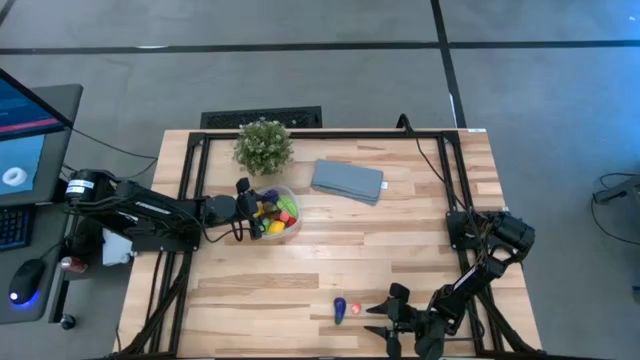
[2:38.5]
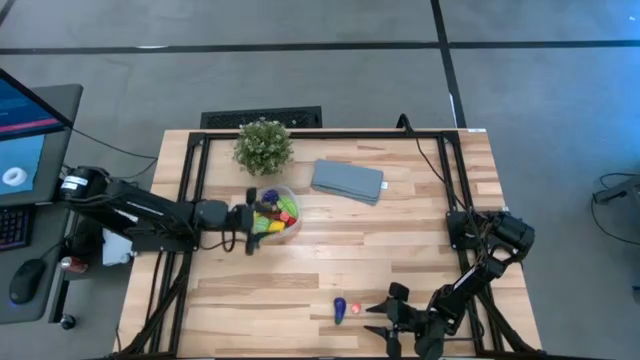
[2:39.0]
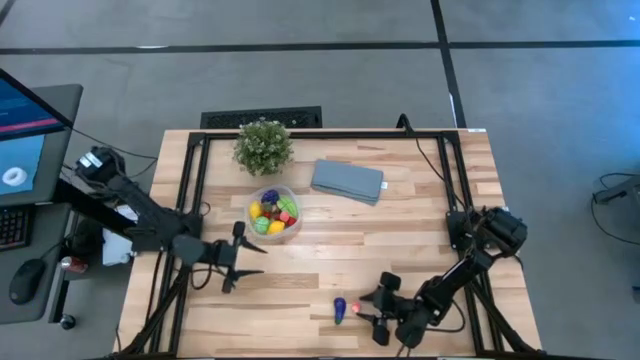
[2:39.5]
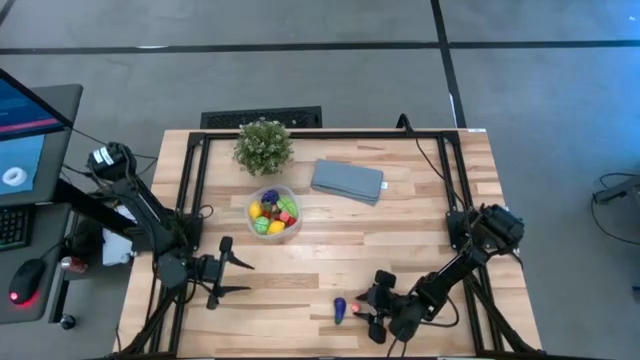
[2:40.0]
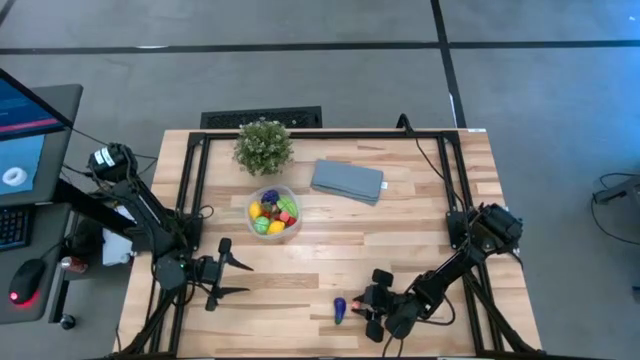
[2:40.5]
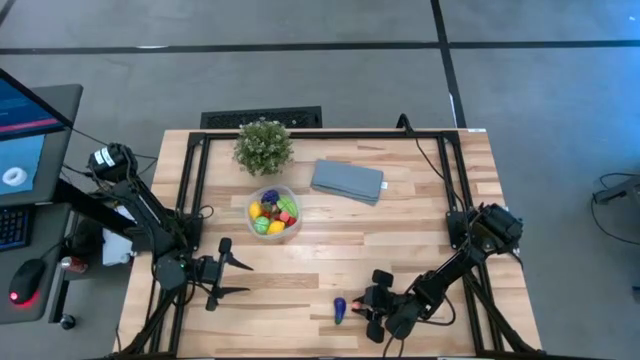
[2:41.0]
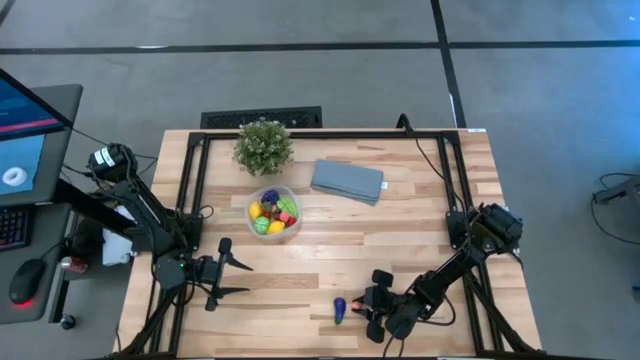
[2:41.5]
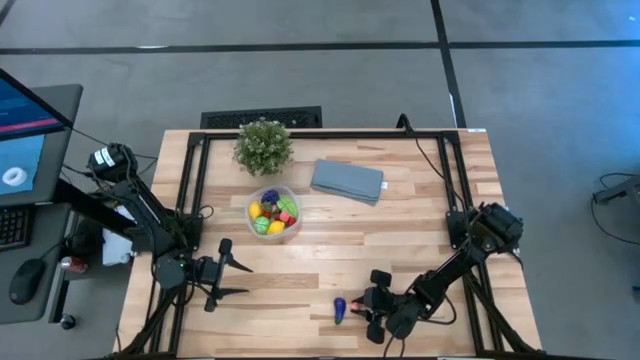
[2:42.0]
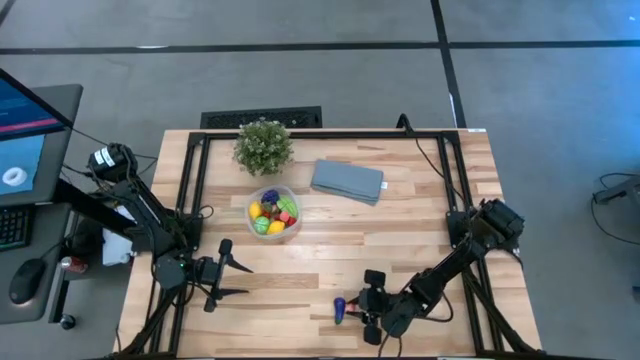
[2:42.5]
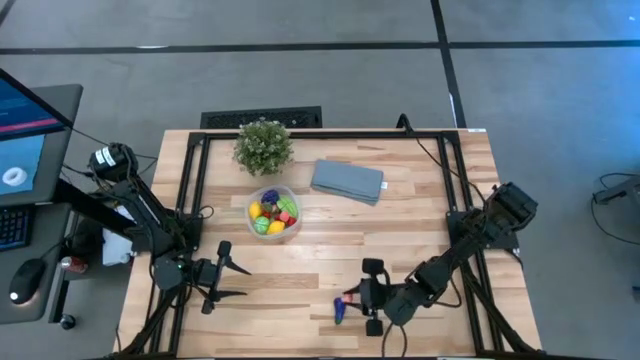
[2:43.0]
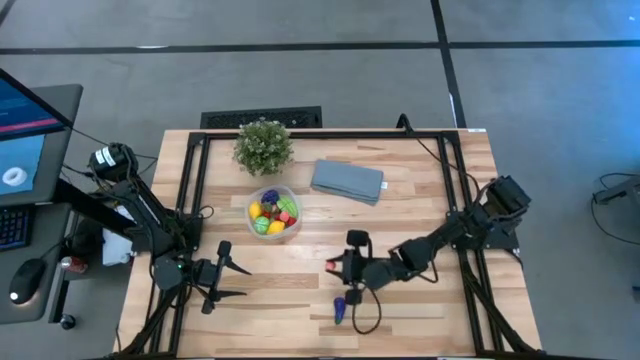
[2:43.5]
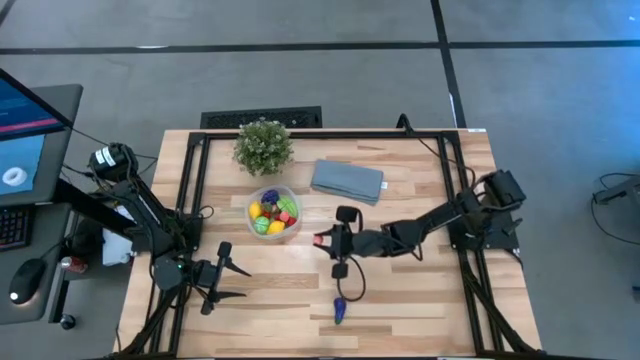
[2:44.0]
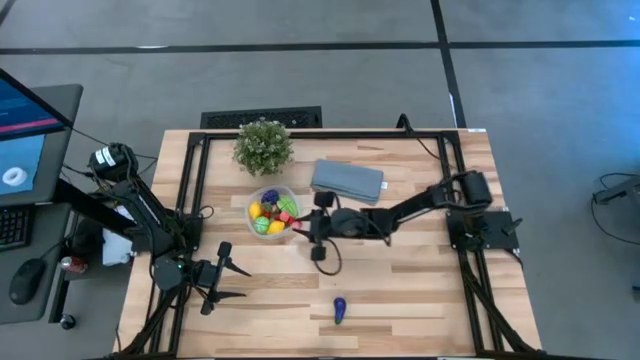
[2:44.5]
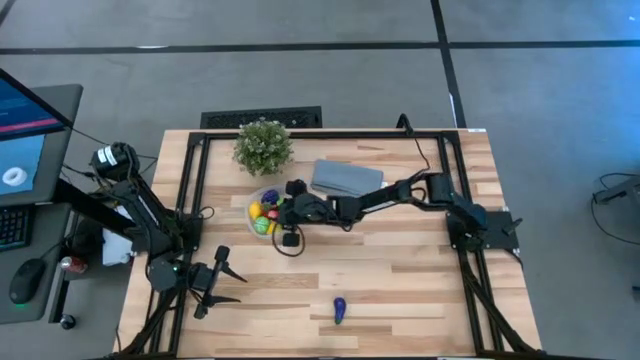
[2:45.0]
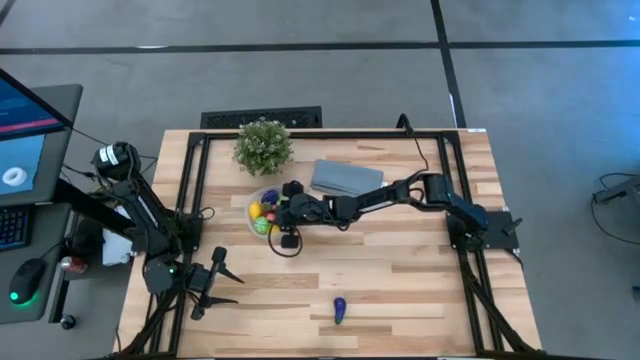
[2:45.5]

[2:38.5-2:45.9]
Task: Pick and placing Produce into tupperware
Put the peach into the transparent bin

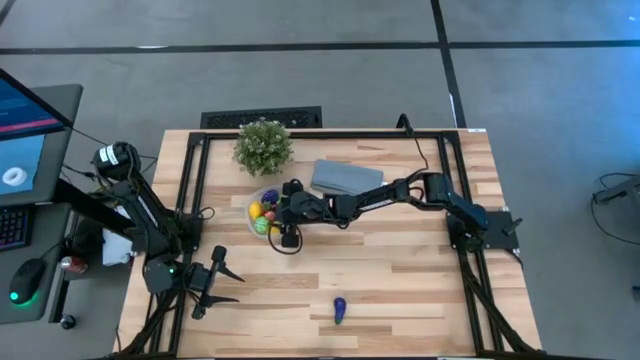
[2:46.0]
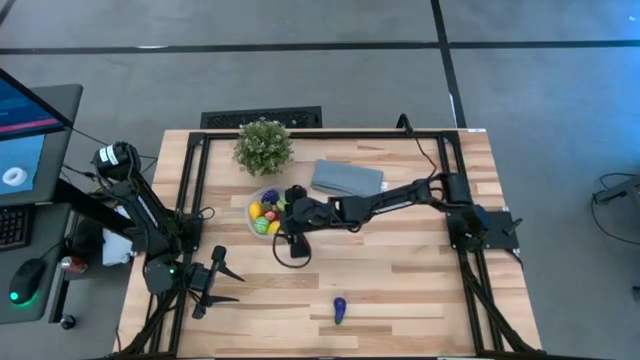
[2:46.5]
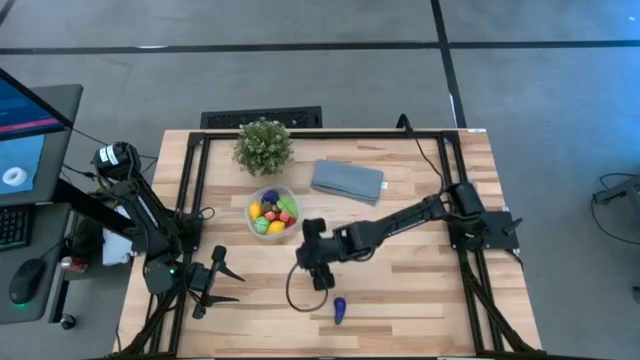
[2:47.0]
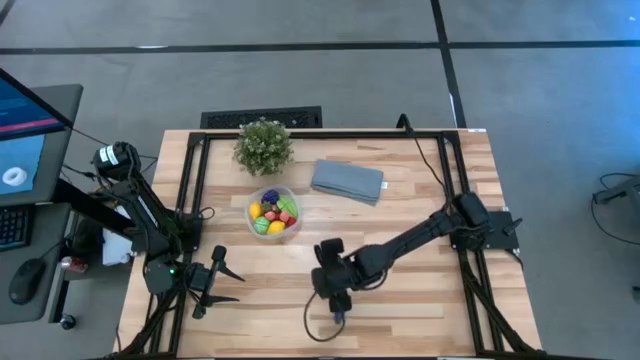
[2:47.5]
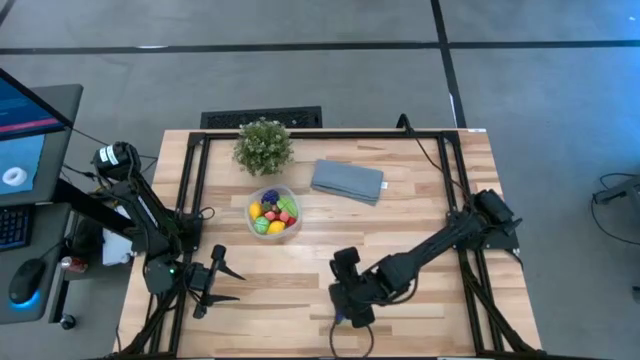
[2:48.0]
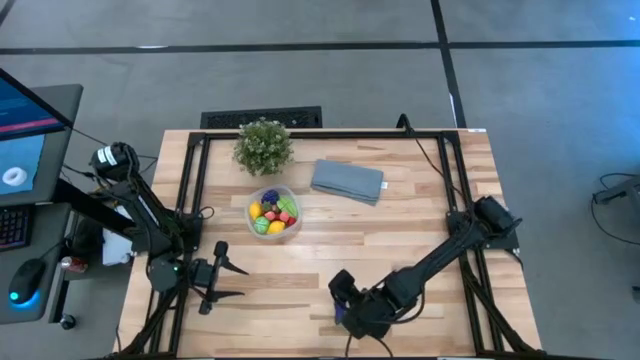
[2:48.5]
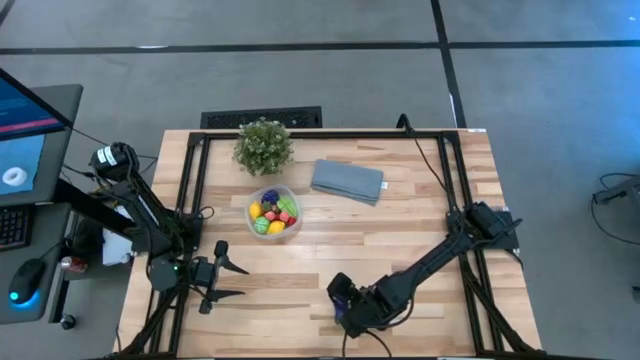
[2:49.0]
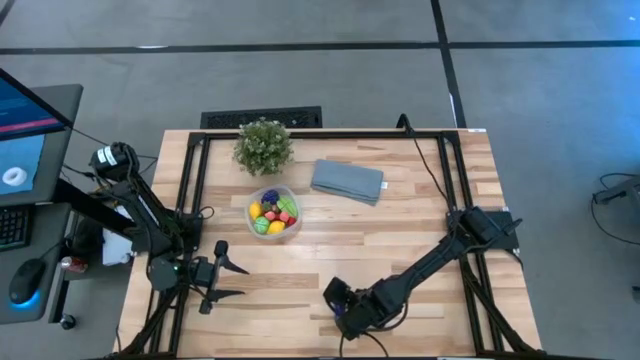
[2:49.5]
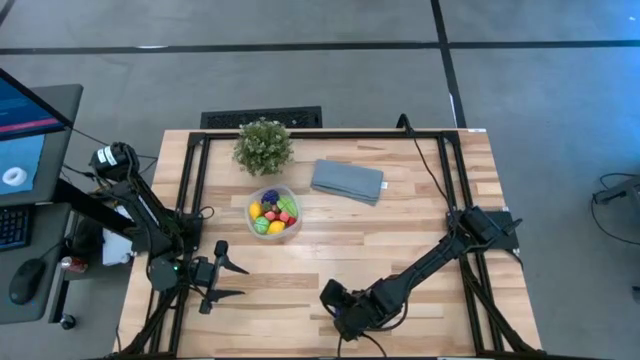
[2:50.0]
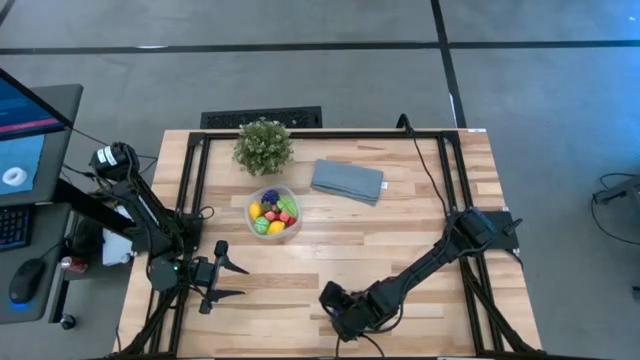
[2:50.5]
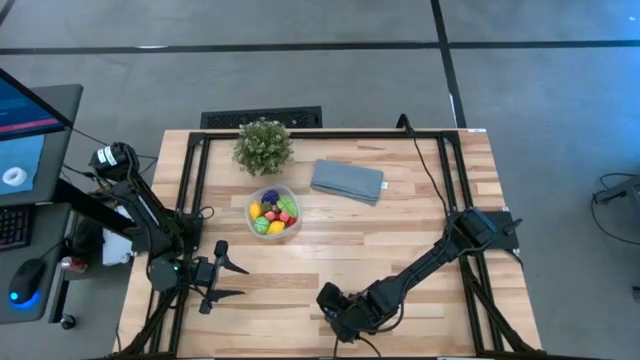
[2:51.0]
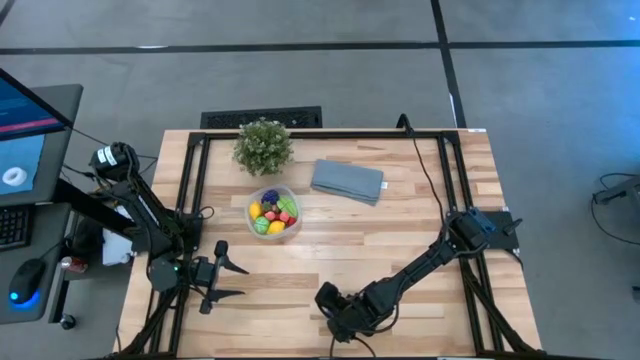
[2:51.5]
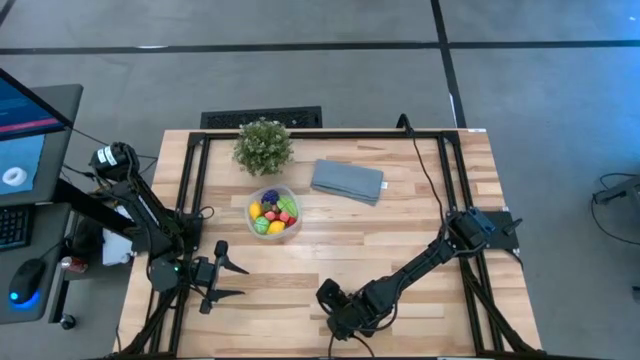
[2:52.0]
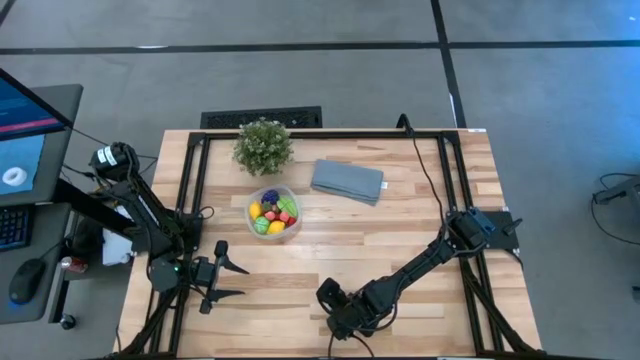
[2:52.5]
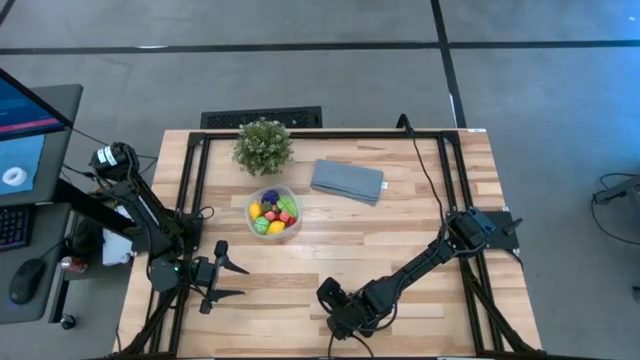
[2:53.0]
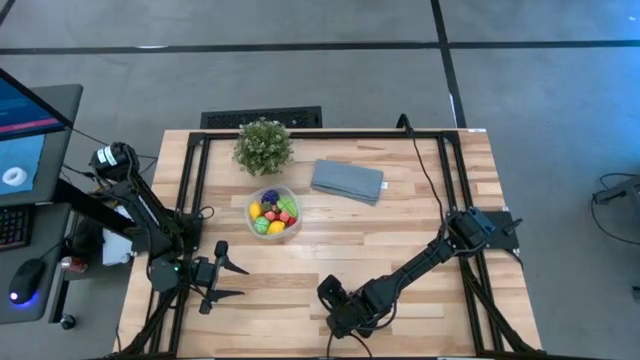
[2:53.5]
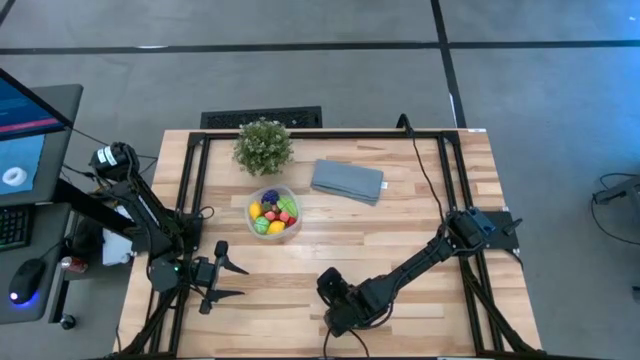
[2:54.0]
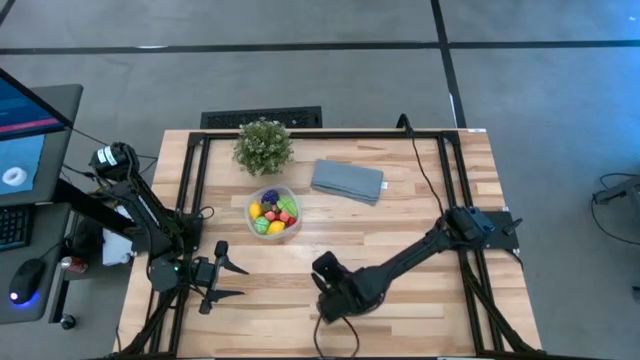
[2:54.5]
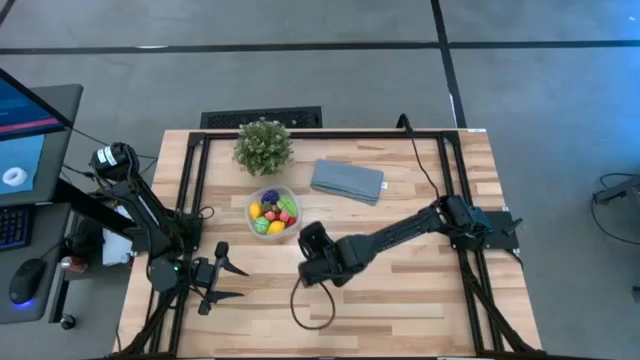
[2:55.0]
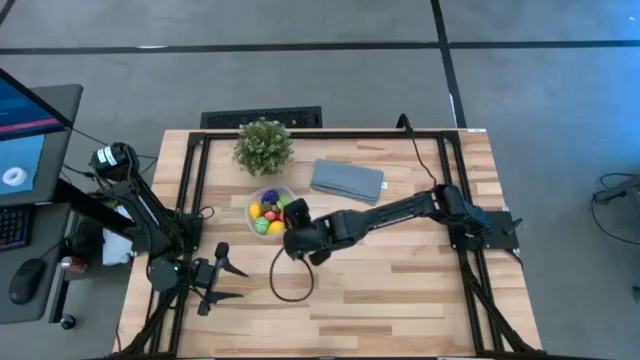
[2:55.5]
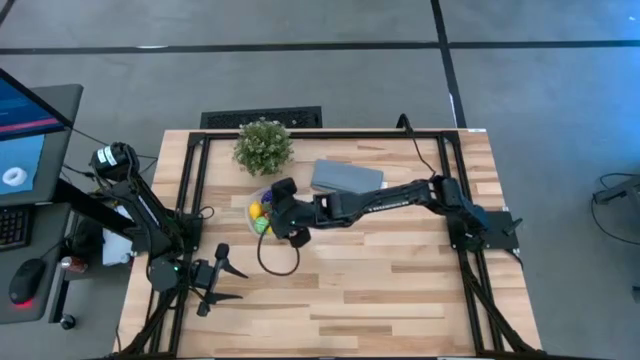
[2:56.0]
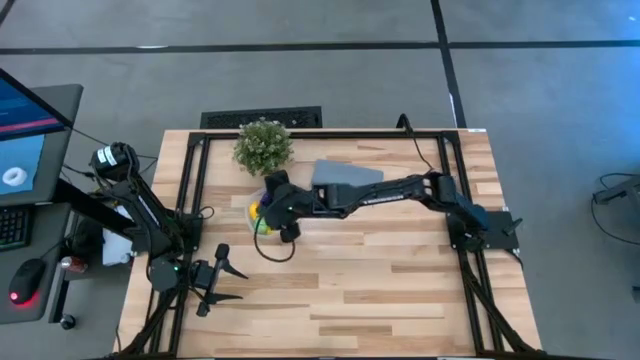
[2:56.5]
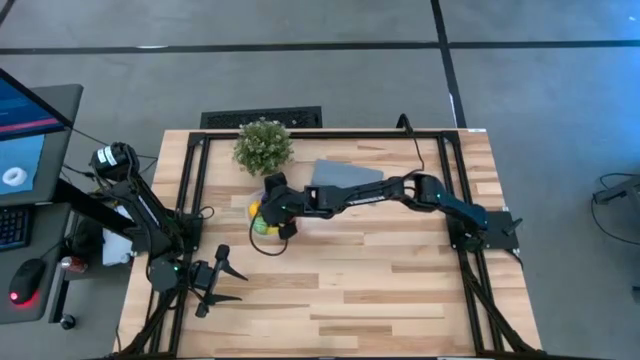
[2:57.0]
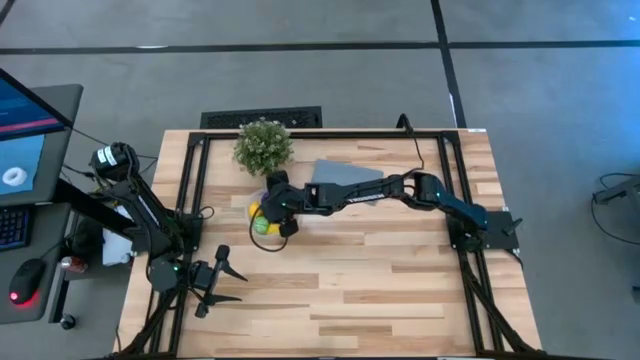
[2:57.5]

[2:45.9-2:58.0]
Put the eggplant into the transparent bin

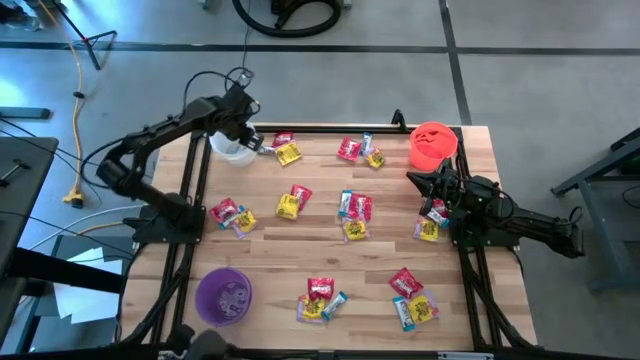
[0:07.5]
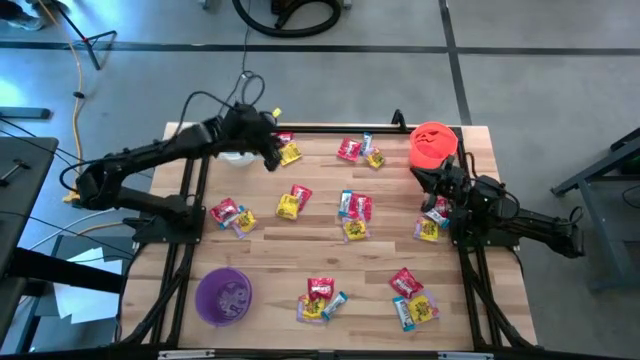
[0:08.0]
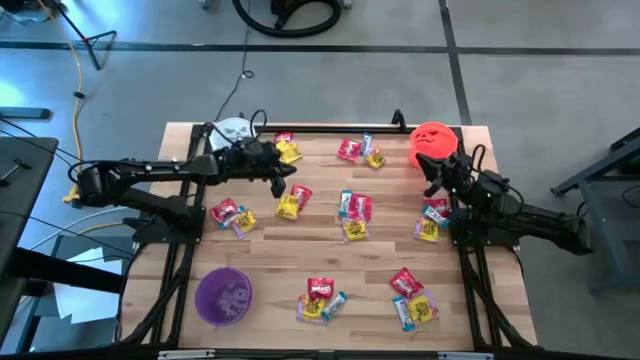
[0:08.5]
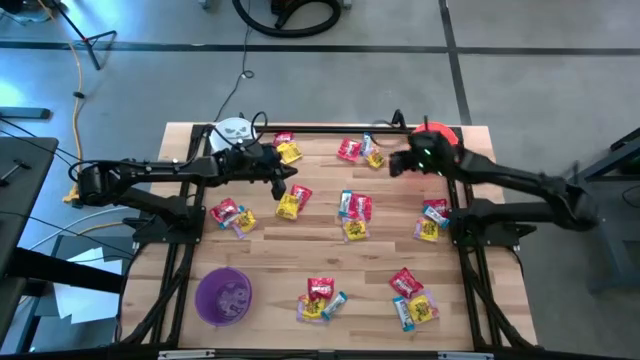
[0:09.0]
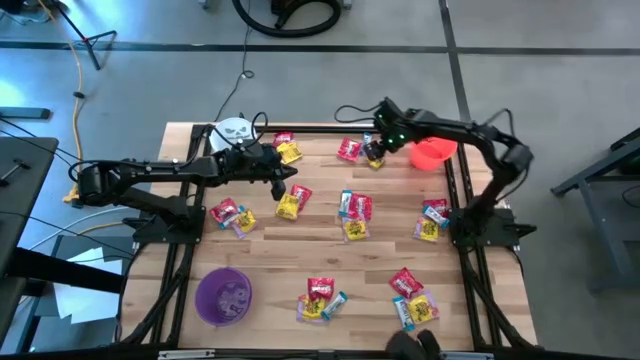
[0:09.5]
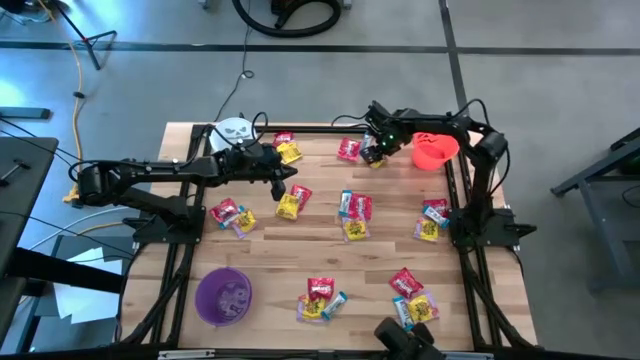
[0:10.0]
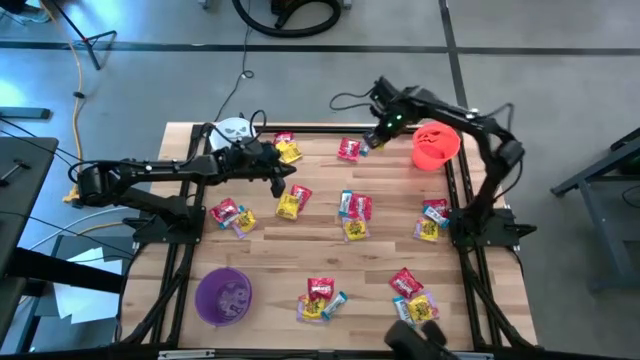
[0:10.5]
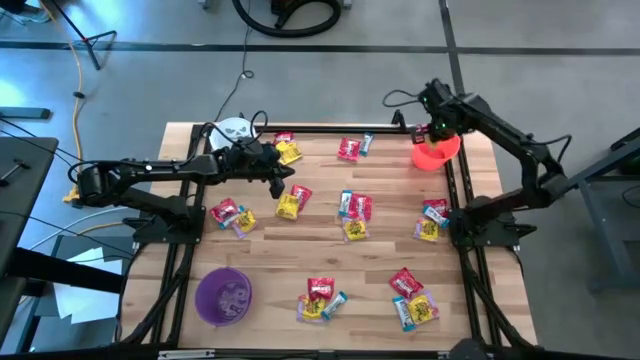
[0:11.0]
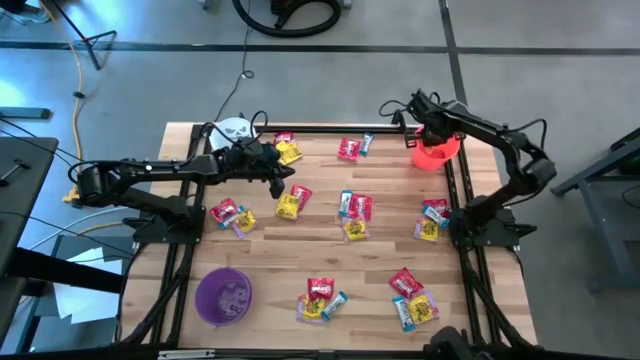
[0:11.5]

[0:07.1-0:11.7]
Task: Sort candy
Put the yellow candy into the orange bucket
